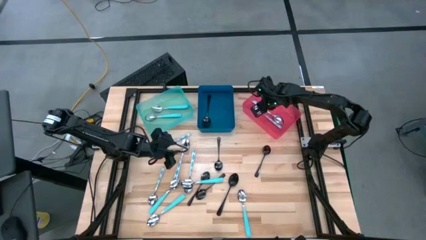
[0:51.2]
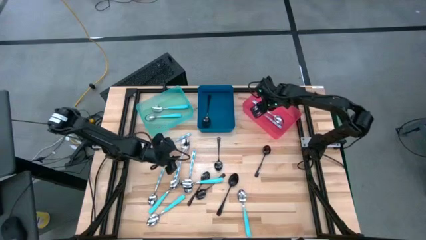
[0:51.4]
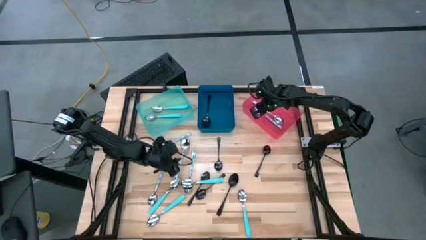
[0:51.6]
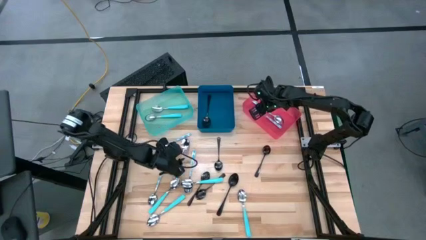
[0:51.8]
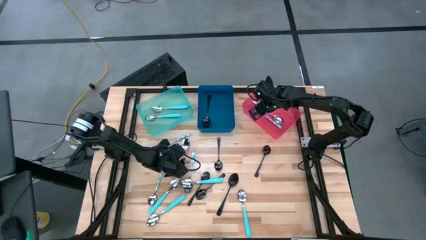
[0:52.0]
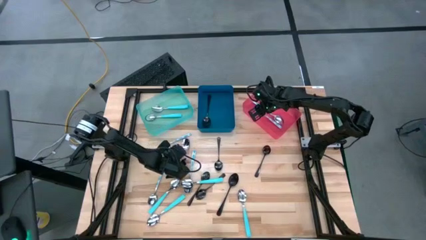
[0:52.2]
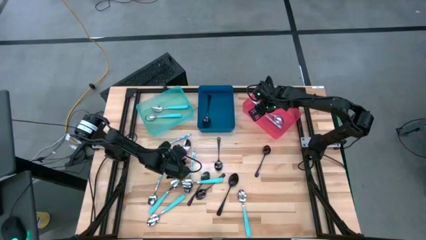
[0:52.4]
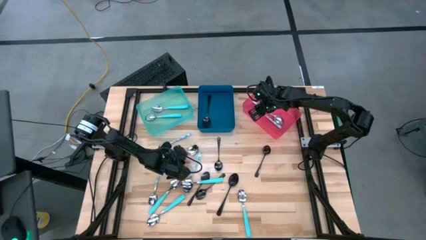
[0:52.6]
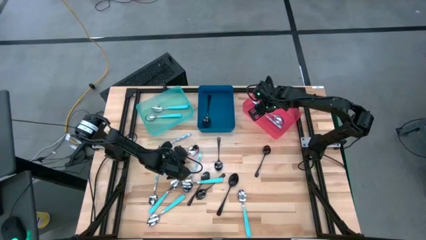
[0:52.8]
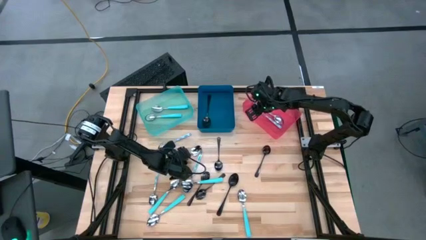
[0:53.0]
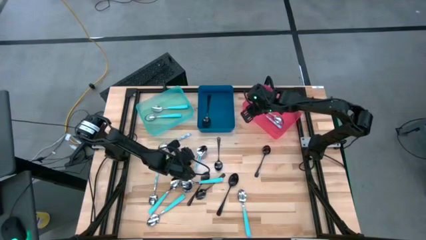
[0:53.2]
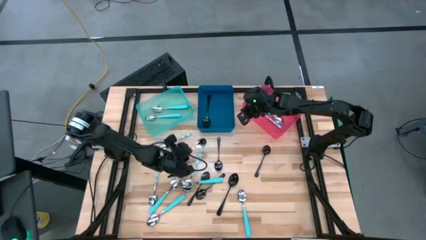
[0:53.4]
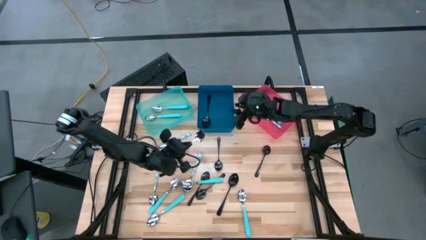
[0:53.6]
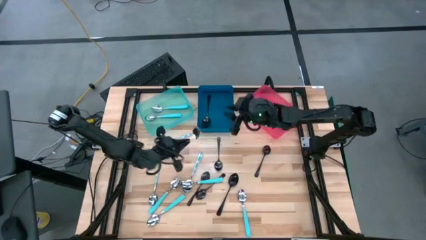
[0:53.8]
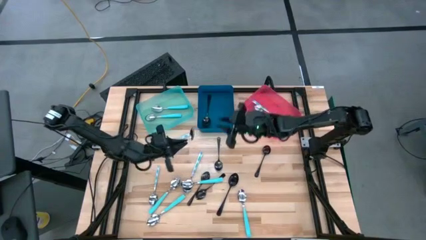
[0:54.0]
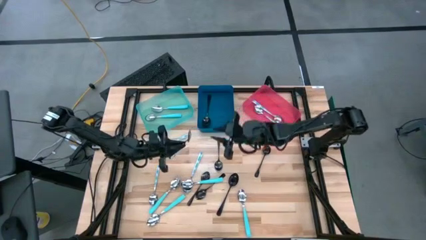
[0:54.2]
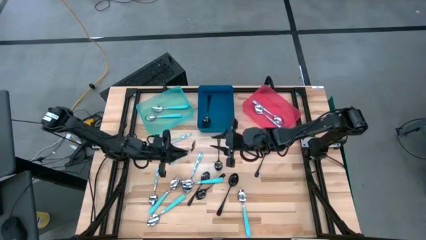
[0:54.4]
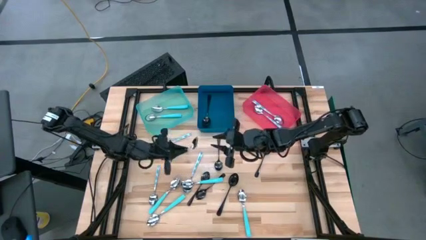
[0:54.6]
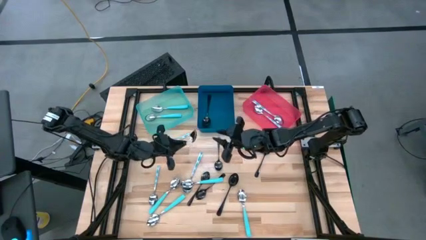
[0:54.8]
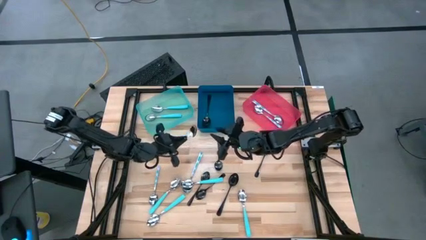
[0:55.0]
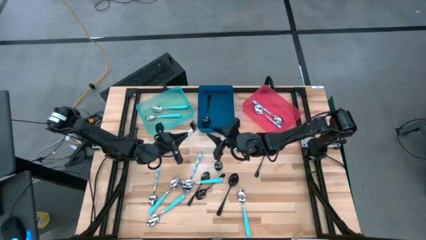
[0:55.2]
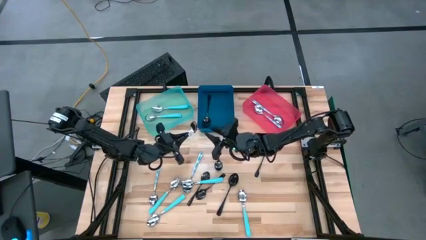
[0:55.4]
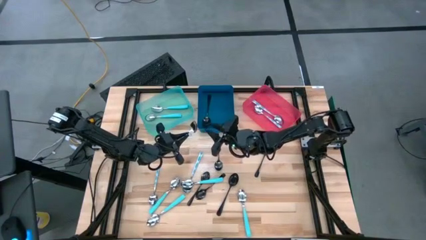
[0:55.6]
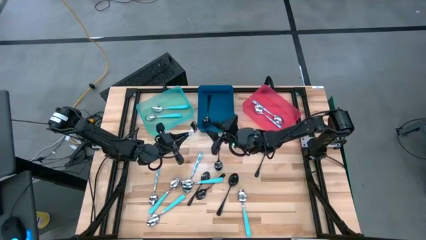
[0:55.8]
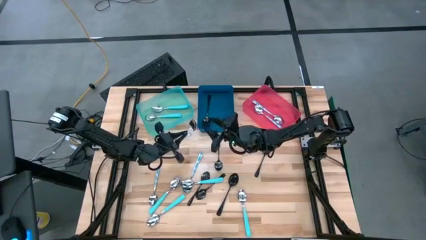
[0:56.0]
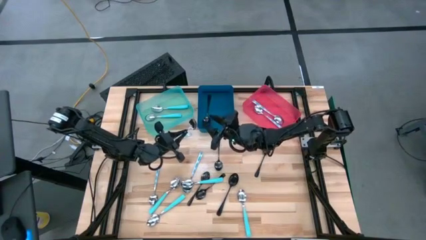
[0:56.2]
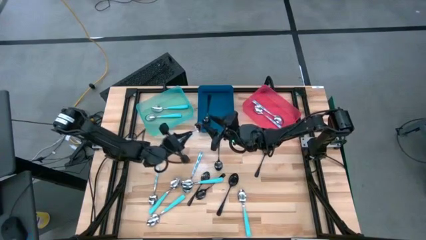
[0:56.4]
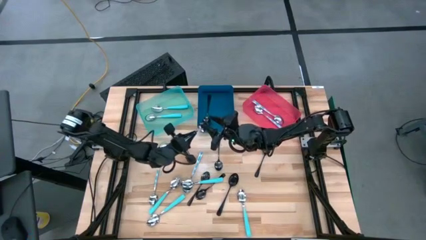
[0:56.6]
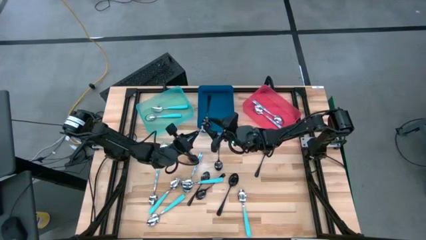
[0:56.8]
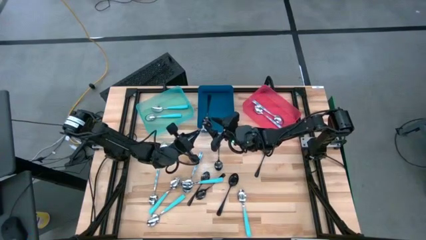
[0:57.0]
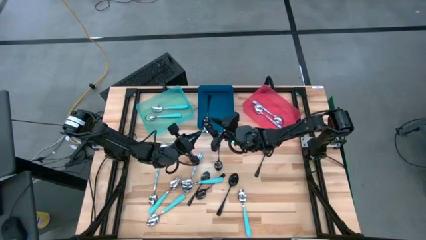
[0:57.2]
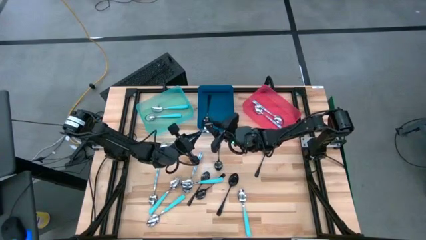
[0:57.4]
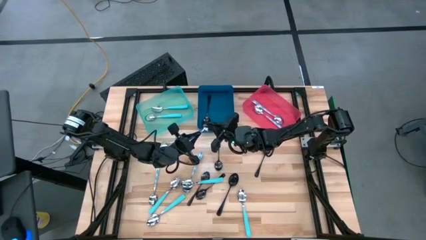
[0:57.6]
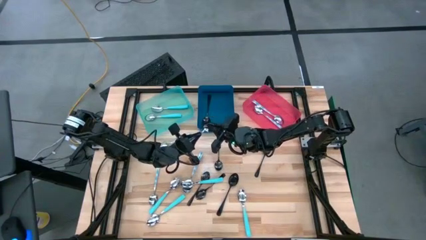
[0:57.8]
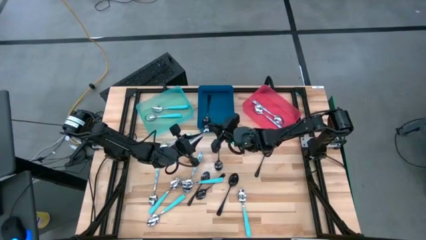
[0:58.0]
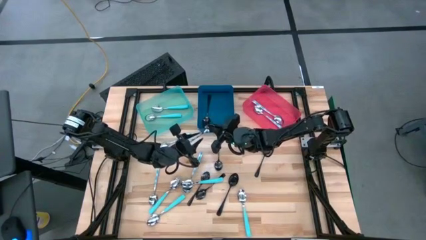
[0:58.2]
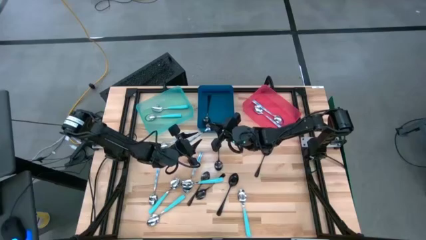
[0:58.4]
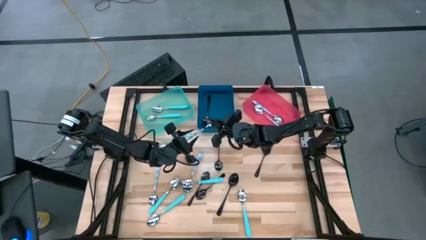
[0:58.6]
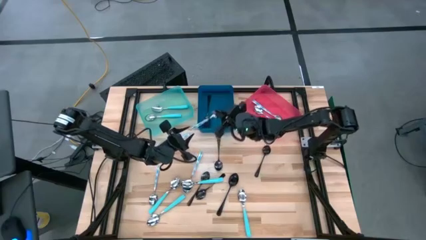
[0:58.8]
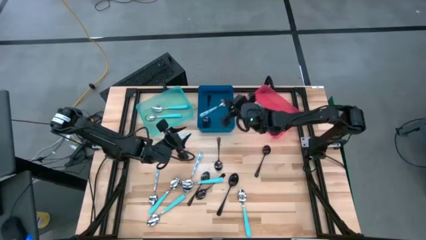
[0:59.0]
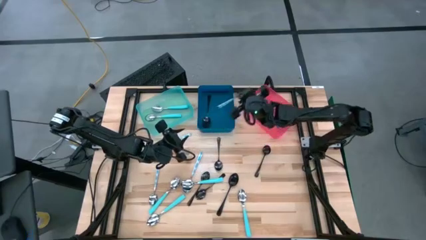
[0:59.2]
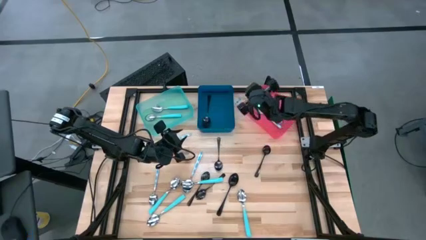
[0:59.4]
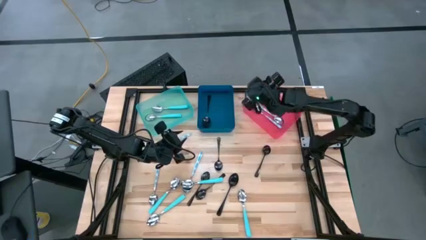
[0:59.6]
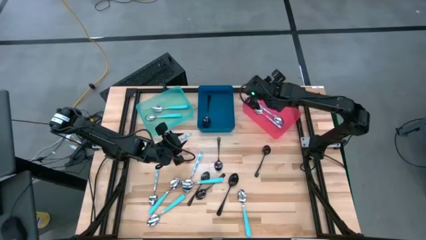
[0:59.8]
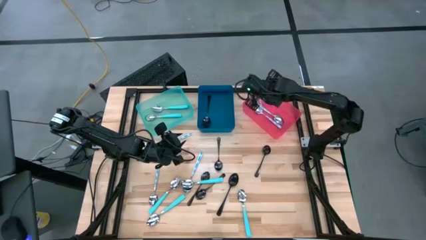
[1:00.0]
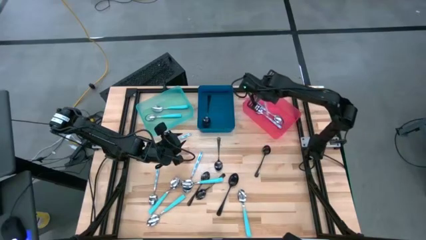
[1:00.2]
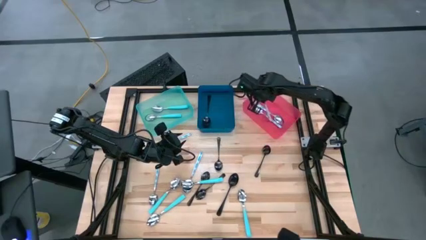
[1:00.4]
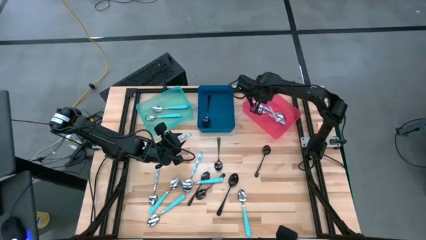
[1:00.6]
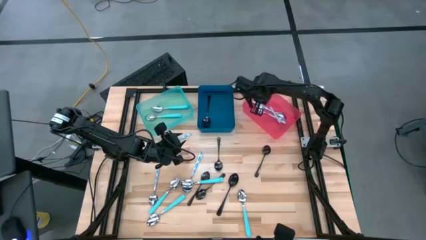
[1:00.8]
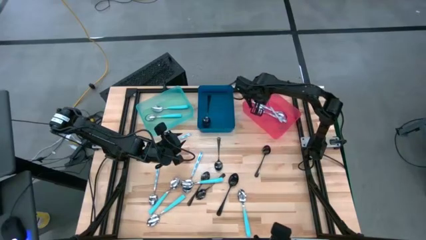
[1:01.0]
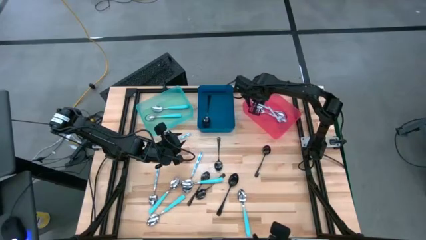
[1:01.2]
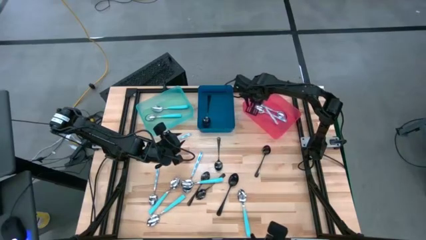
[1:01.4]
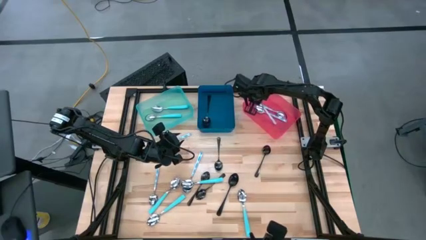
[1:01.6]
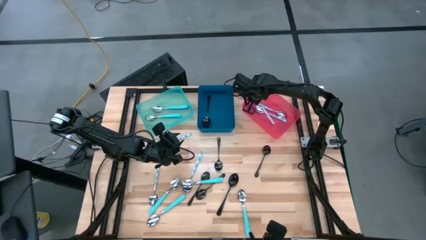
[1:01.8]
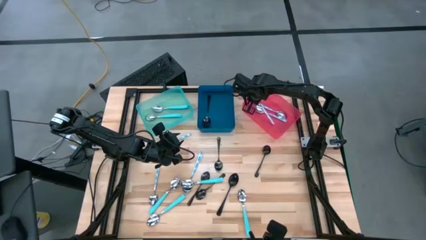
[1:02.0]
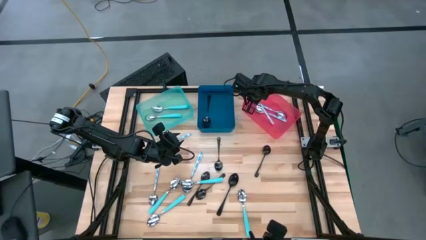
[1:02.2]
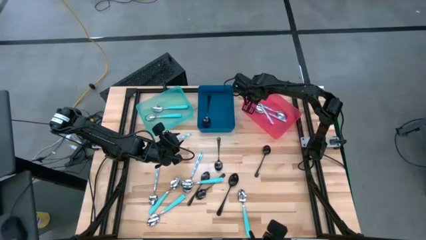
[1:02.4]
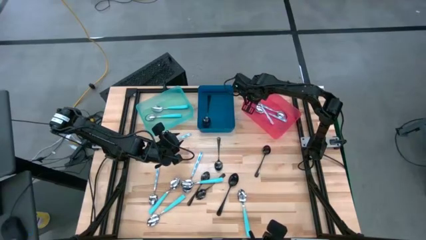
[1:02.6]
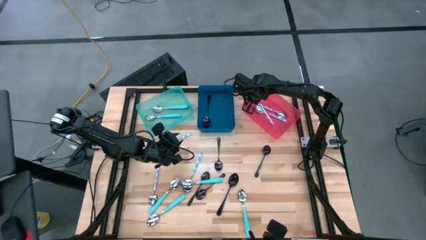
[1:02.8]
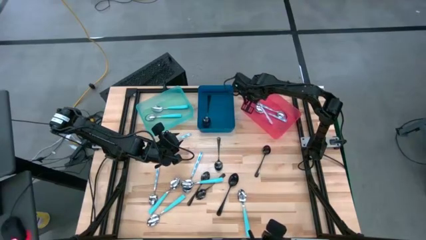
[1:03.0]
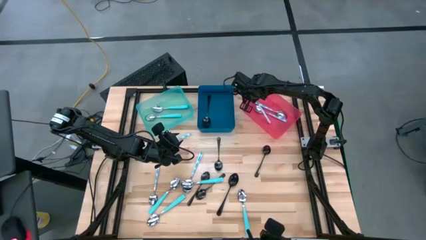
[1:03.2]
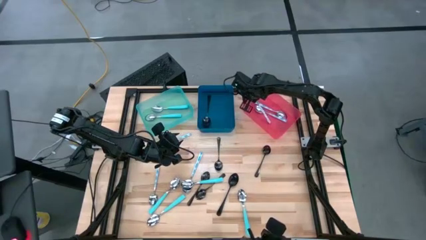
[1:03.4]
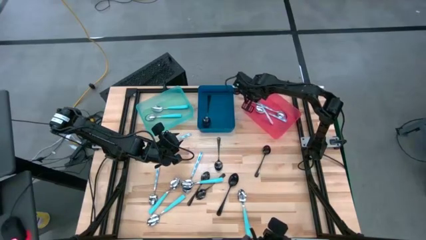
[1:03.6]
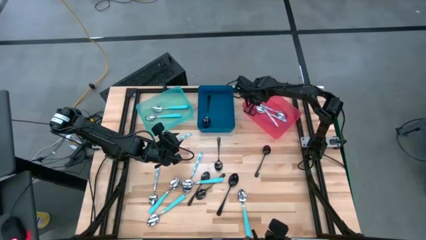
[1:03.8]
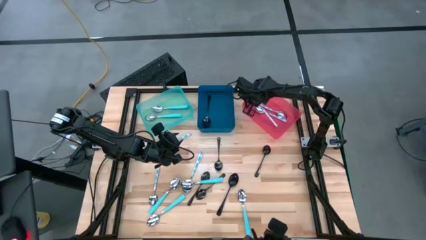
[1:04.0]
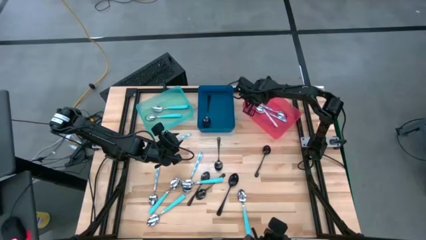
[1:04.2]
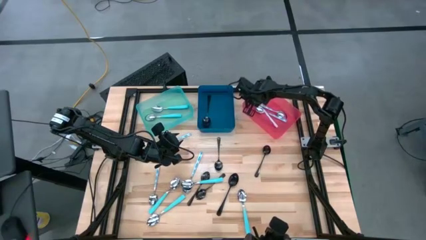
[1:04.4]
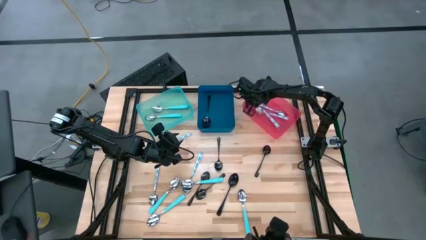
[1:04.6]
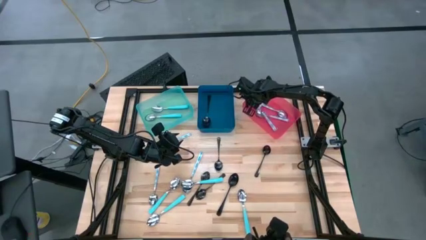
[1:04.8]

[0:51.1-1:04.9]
Task: Sort silverware by color (type)
Put the white patterned spoon into the pink bin
